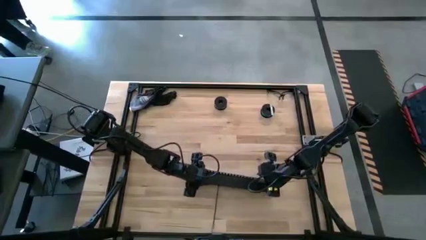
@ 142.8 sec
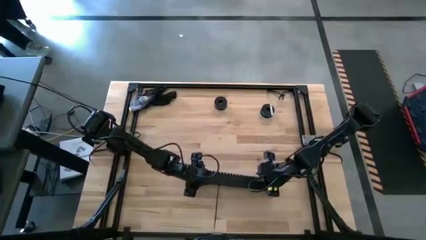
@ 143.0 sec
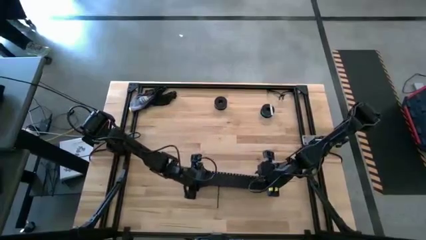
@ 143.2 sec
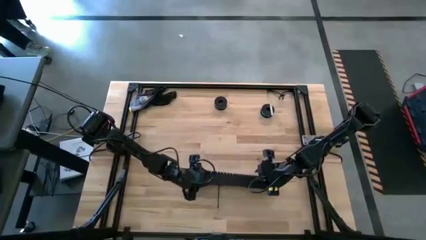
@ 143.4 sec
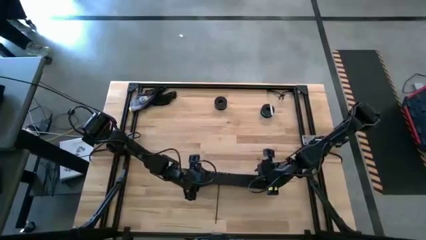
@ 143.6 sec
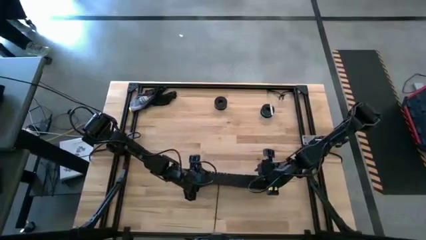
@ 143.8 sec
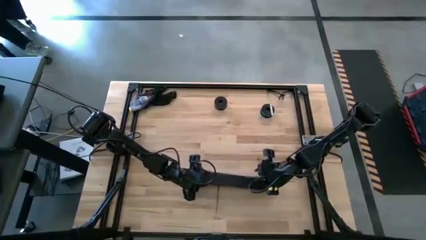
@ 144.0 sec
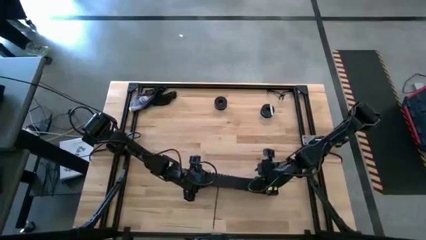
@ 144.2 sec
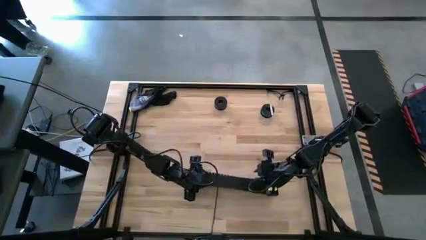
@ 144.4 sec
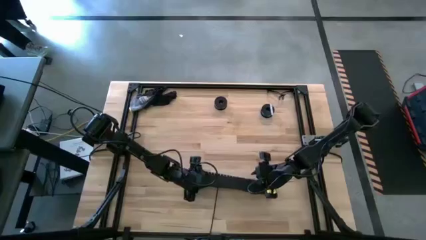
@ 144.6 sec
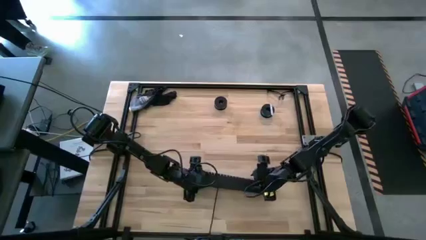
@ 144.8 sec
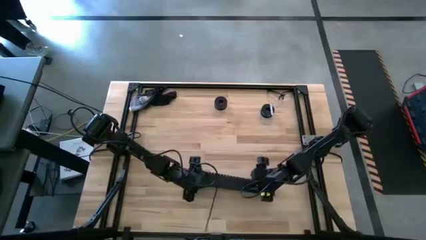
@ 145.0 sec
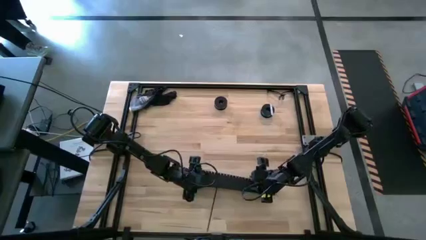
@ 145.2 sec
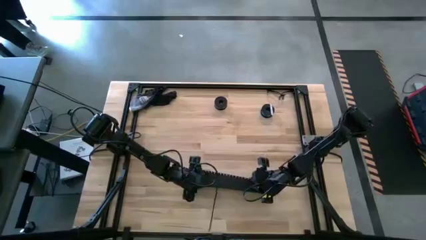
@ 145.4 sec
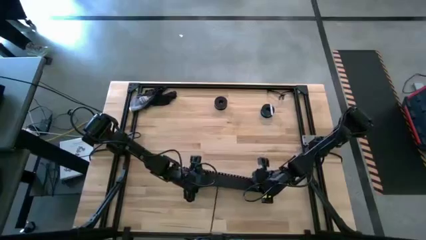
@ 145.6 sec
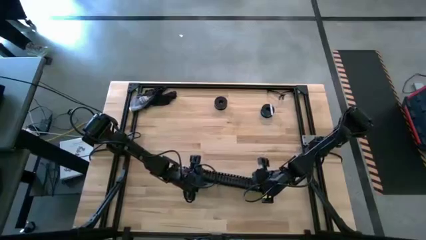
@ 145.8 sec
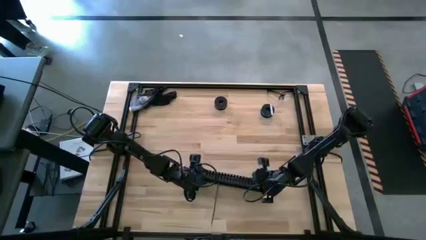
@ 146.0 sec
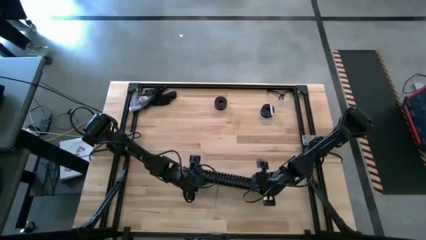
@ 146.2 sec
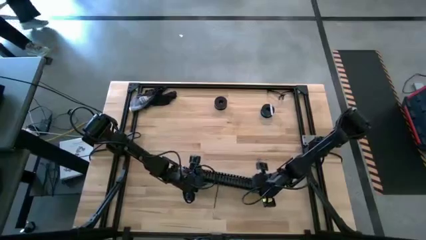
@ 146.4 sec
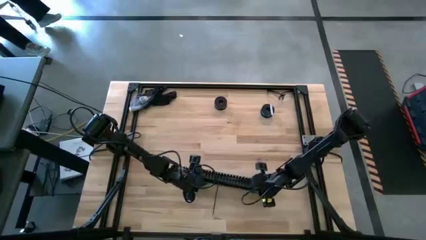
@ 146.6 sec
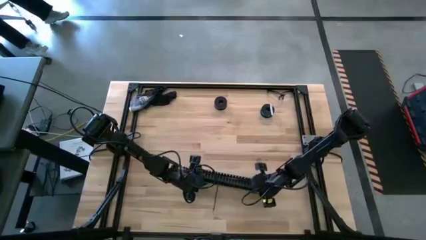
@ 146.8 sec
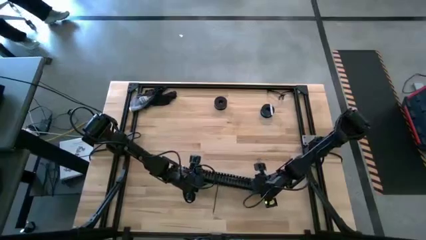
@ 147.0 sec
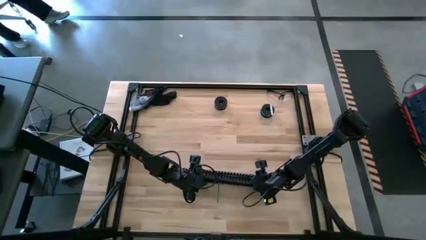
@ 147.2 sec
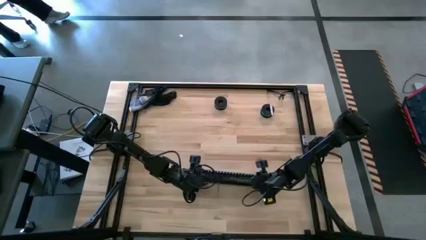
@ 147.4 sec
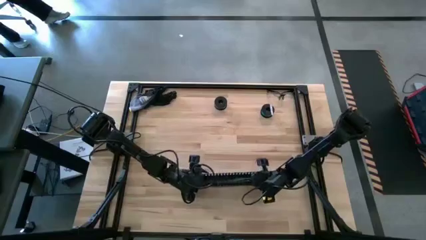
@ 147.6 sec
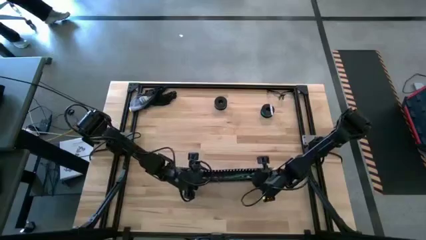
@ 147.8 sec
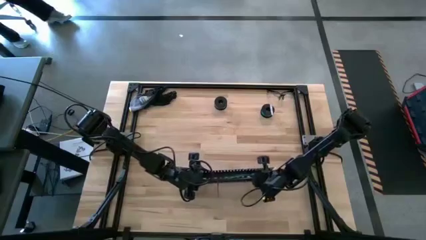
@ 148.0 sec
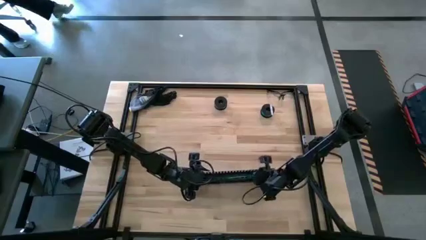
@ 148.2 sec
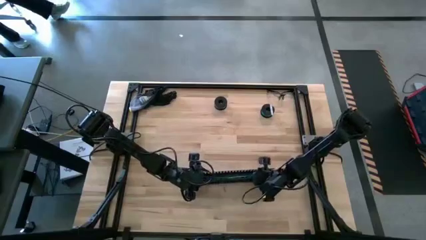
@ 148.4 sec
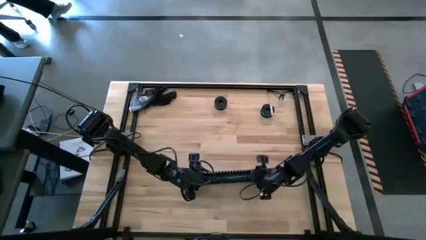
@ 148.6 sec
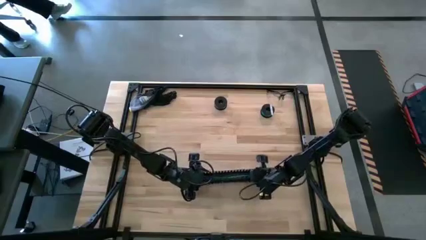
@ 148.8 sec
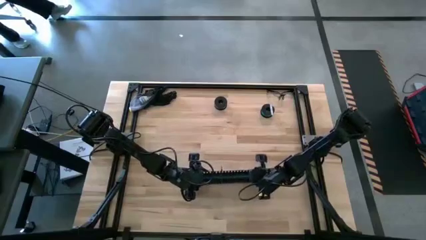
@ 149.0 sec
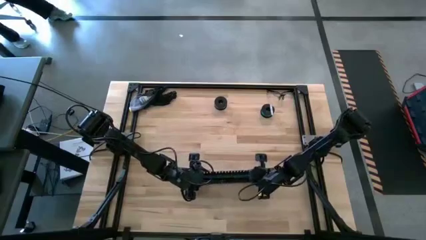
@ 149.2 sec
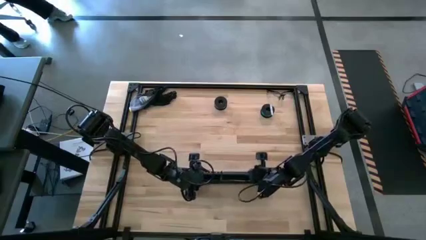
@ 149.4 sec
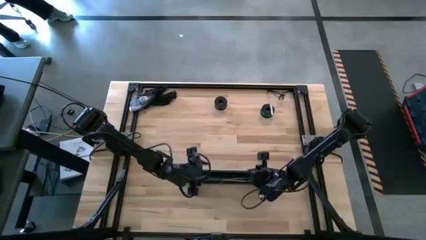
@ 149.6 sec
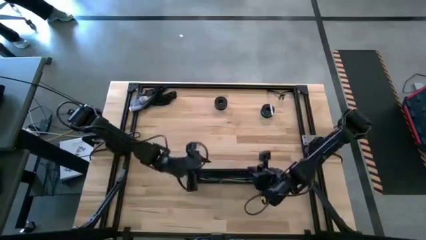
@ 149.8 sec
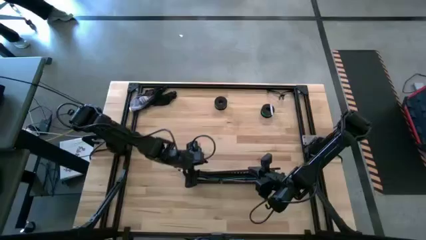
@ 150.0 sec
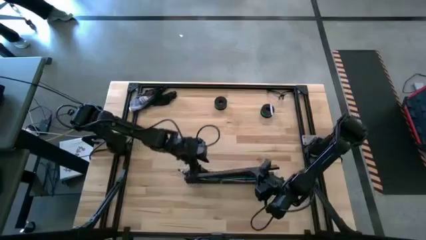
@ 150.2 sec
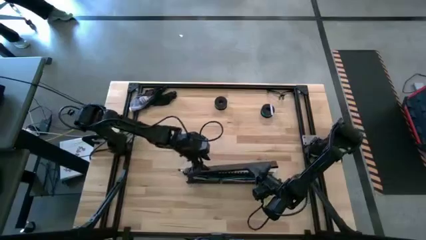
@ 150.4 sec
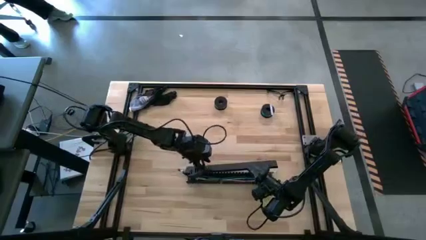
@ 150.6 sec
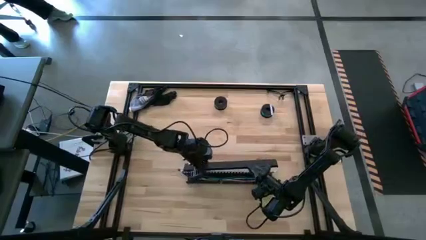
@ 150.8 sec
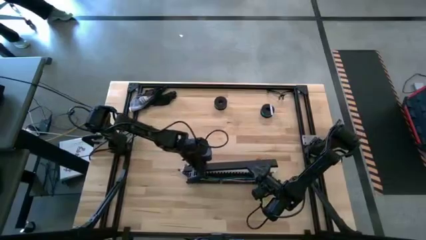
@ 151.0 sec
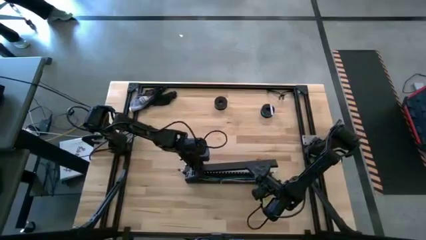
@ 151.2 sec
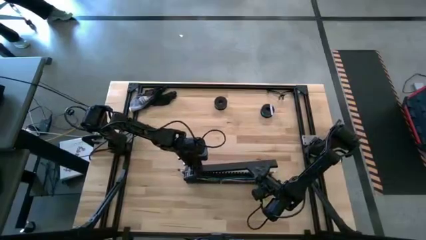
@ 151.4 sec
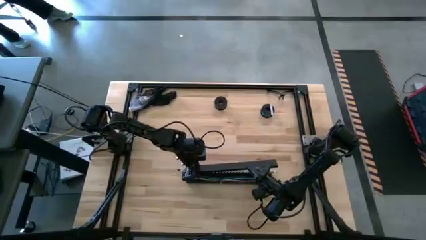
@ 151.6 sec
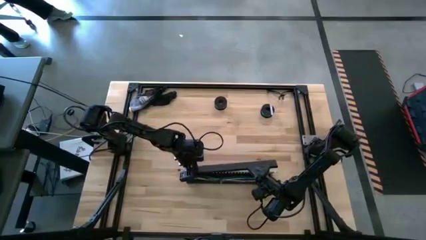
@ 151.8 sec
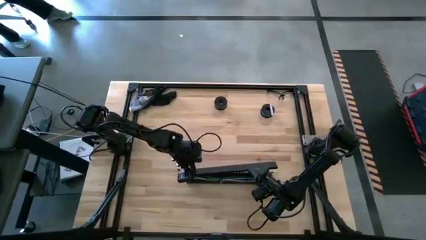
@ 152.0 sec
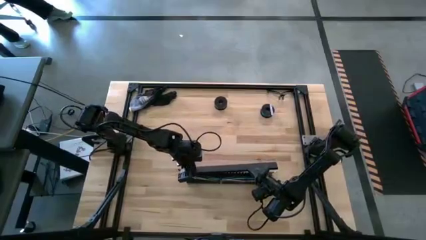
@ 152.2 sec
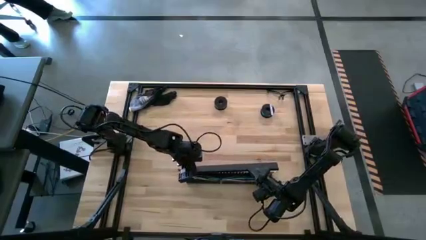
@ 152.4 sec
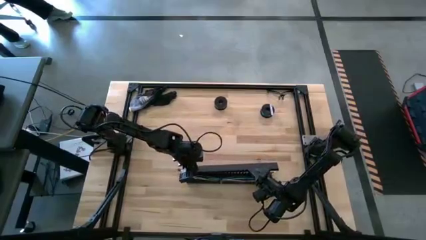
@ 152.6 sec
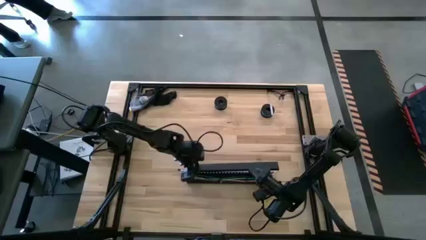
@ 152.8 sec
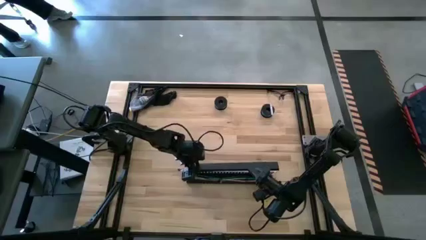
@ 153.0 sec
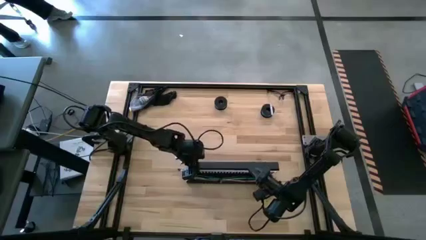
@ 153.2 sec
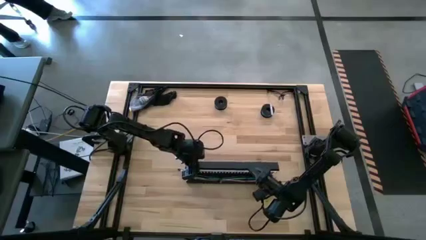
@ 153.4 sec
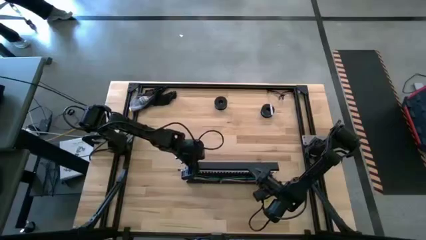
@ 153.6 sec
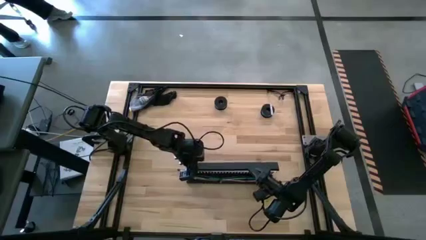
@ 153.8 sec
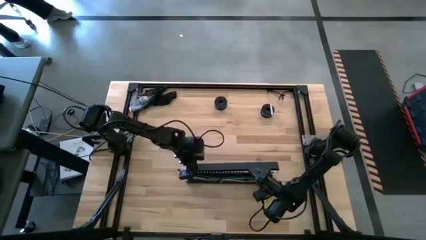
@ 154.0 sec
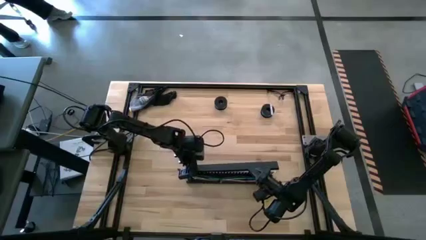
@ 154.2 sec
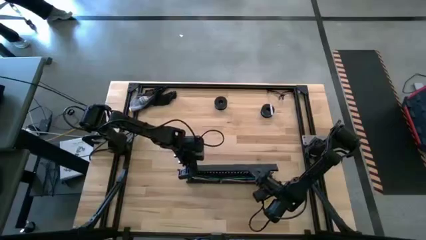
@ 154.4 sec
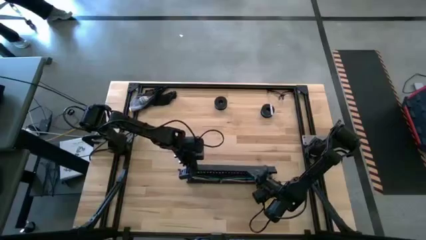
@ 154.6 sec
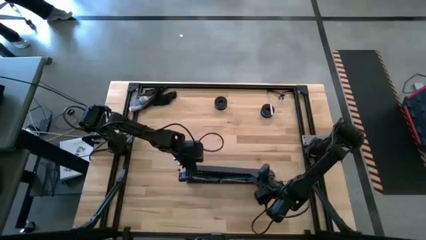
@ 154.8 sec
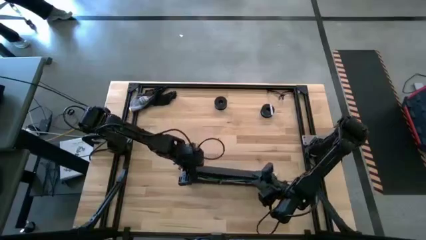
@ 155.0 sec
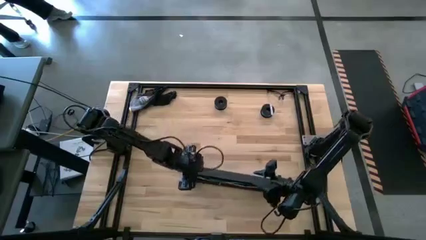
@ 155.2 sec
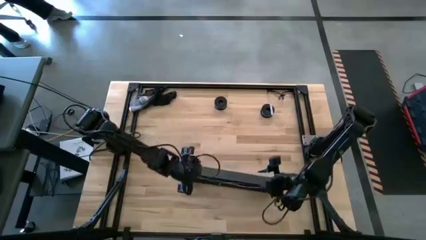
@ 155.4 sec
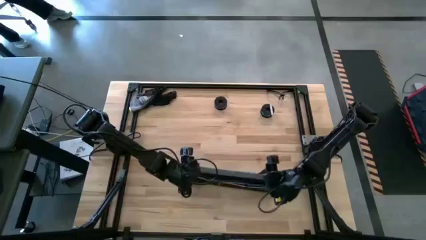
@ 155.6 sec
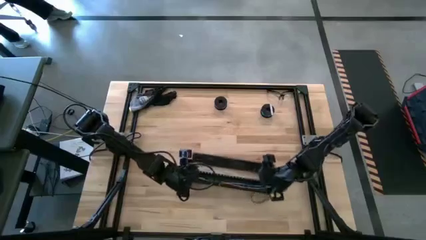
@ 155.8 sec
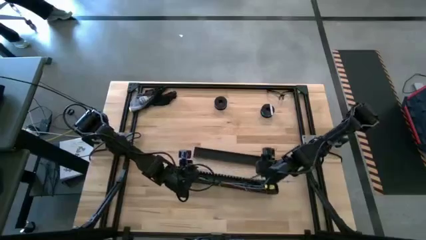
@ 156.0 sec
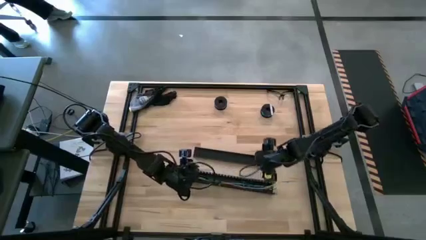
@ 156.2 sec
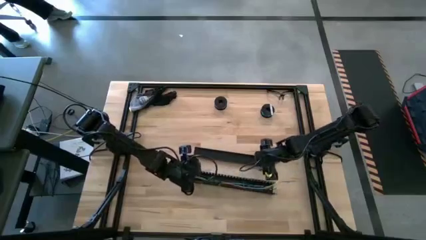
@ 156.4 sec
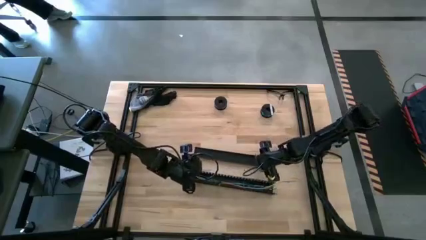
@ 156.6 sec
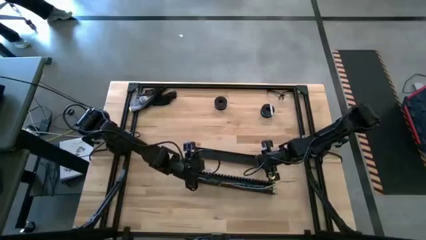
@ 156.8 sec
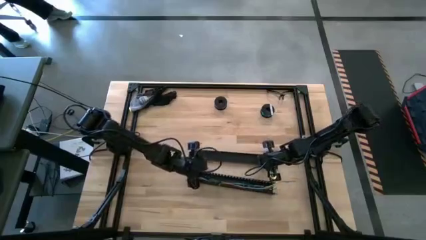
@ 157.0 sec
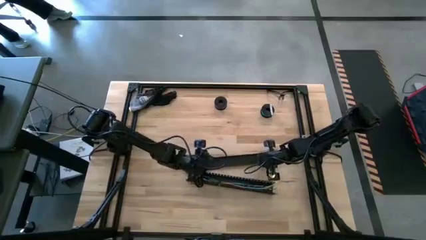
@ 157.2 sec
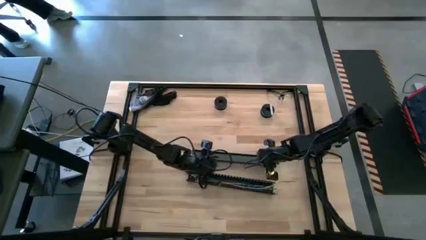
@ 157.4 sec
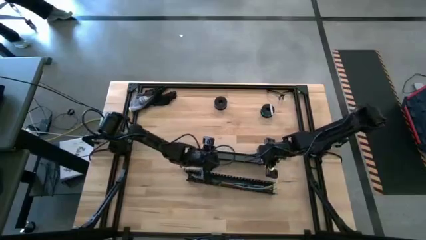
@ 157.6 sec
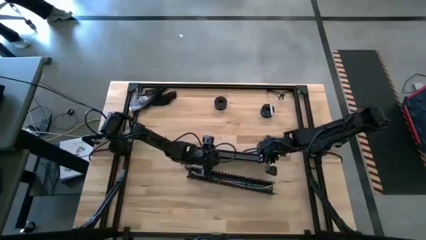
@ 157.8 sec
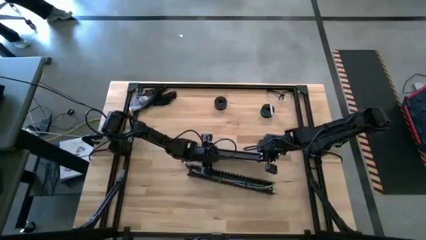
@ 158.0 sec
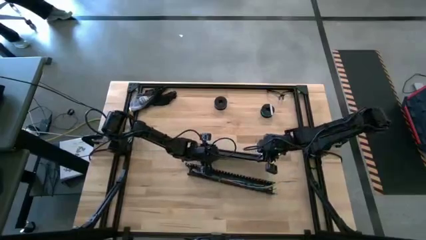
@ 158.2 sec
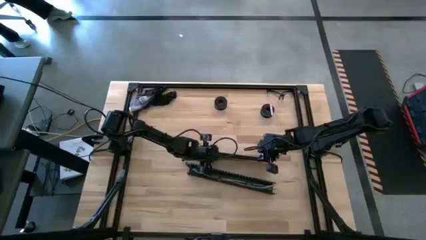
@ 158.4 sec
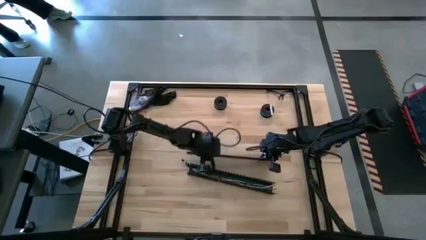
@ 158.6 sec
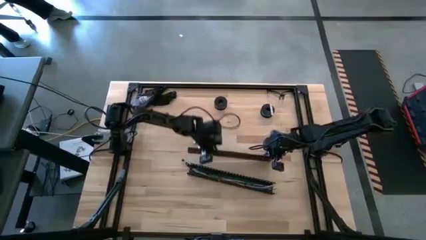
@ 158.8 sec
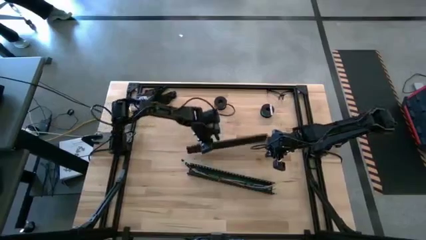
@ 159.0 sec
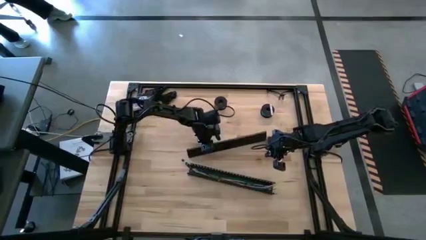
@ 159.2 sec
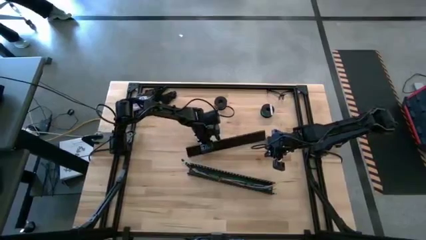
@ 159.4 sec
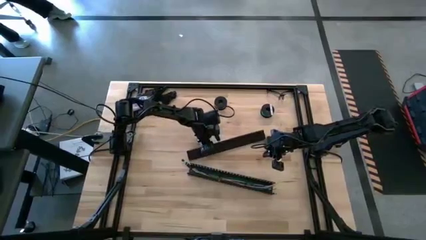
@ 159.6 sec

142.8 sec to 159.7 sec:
Task: Ziptie cables
Close the black cable duct
